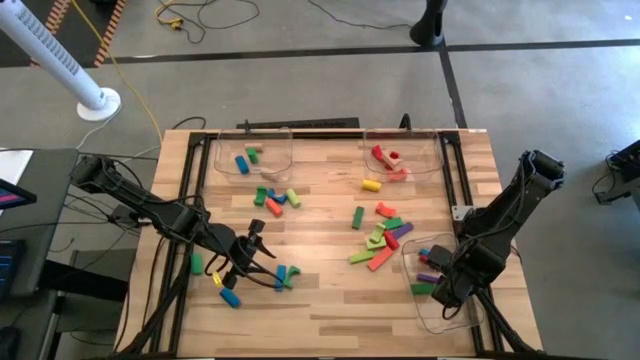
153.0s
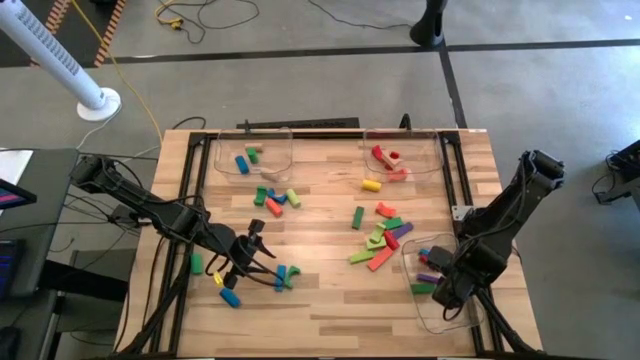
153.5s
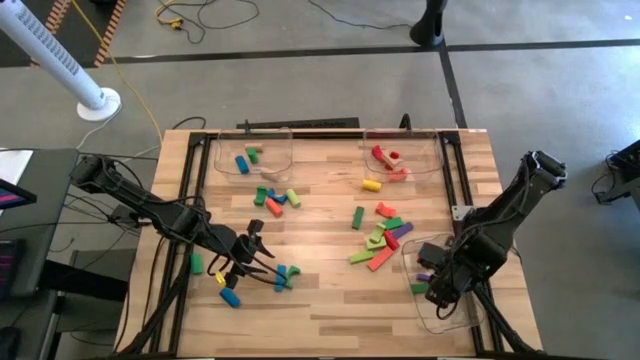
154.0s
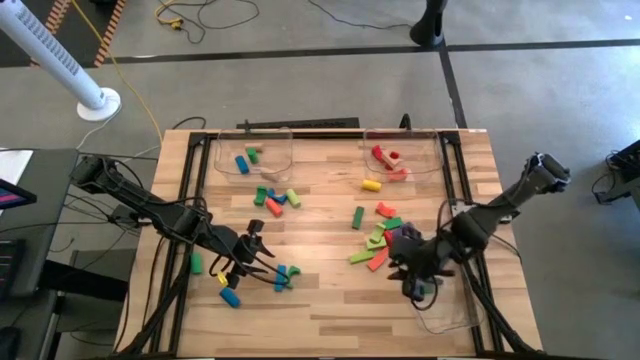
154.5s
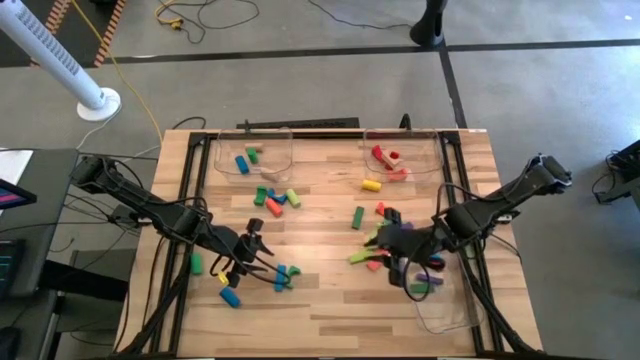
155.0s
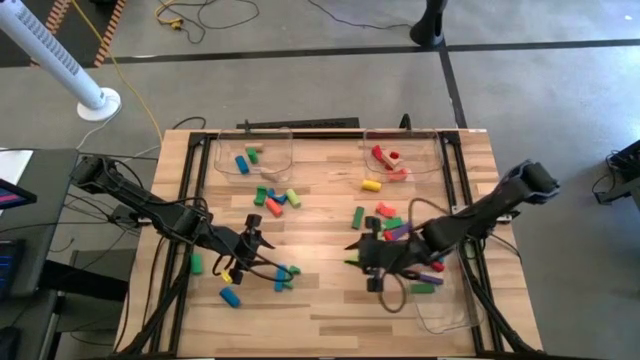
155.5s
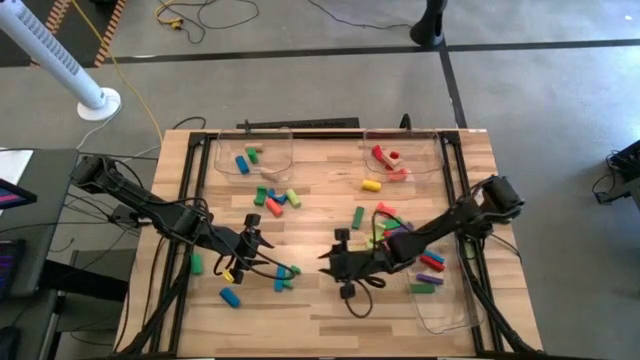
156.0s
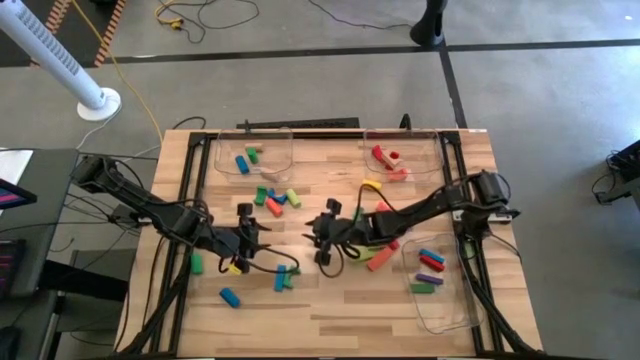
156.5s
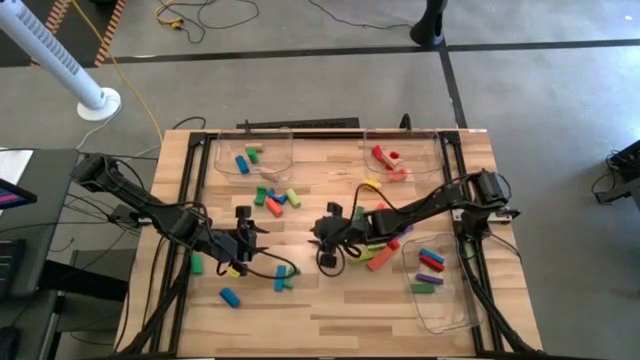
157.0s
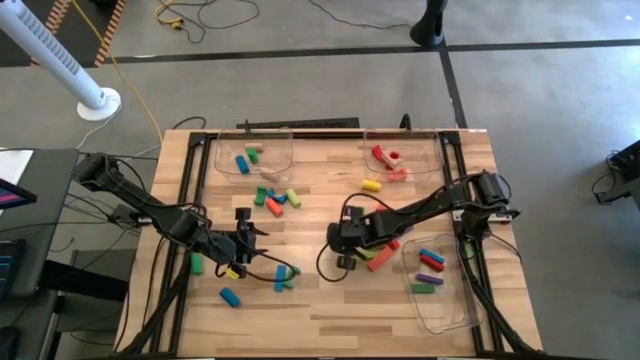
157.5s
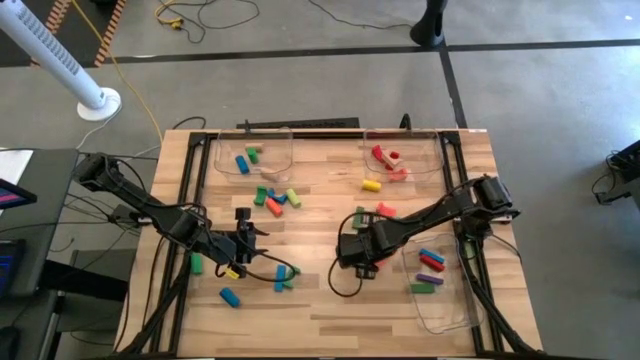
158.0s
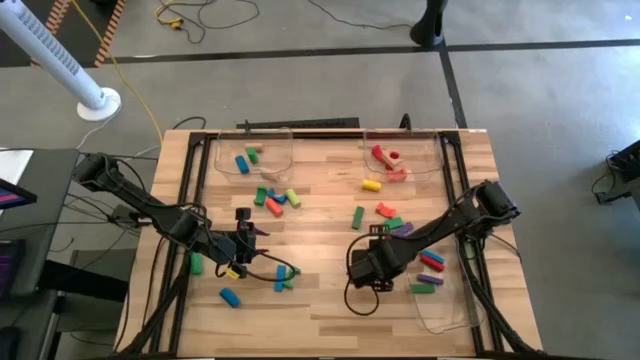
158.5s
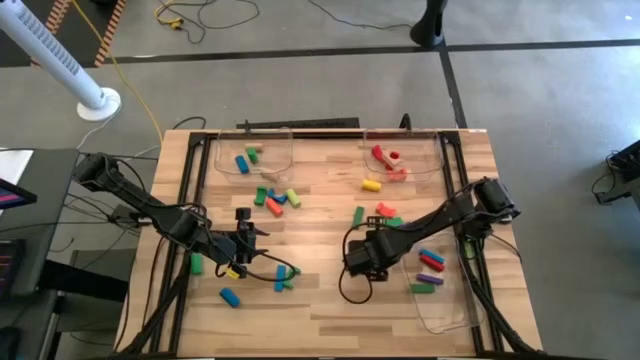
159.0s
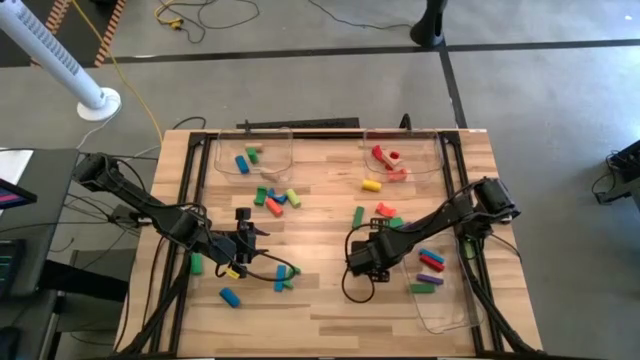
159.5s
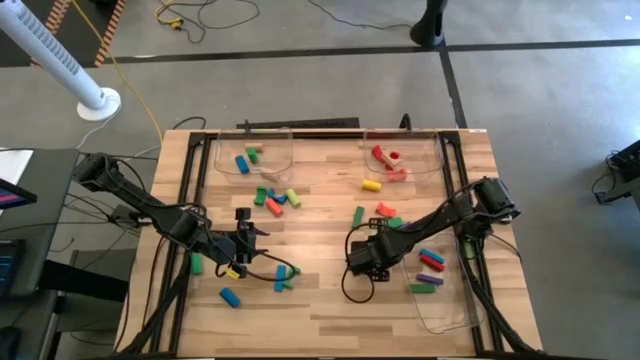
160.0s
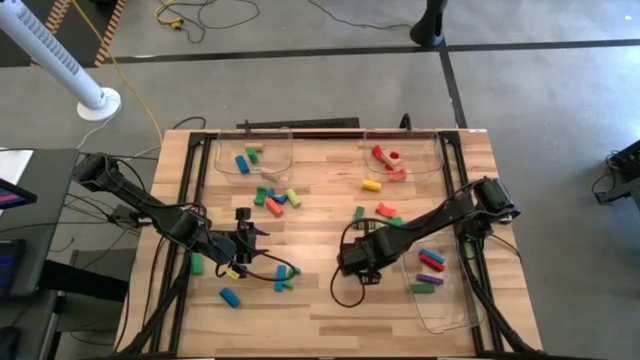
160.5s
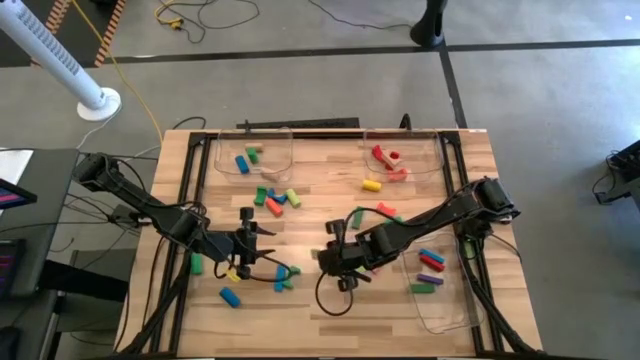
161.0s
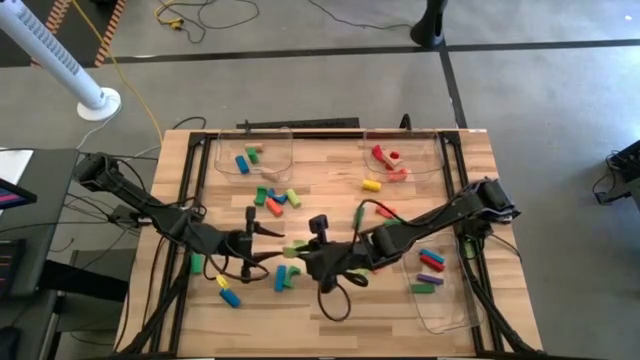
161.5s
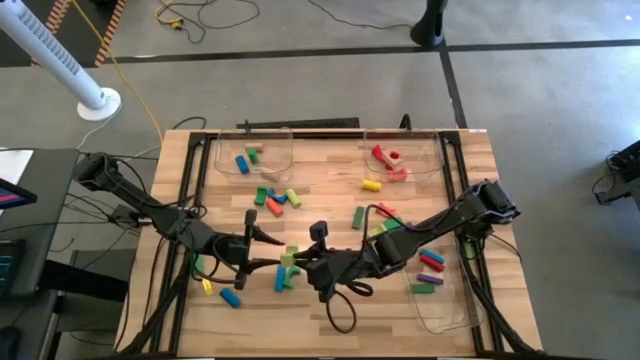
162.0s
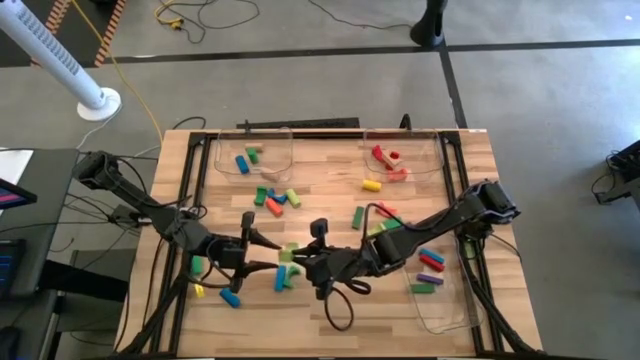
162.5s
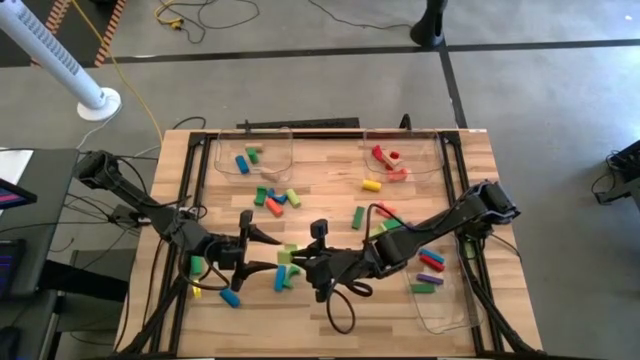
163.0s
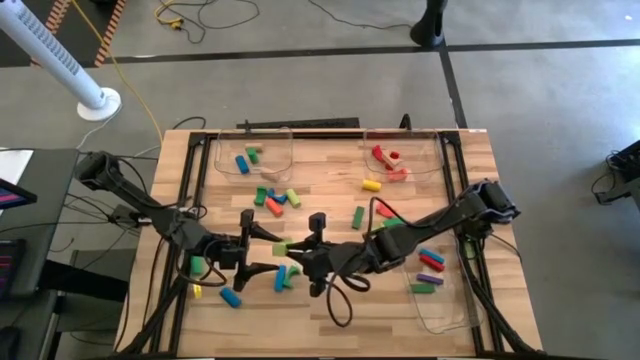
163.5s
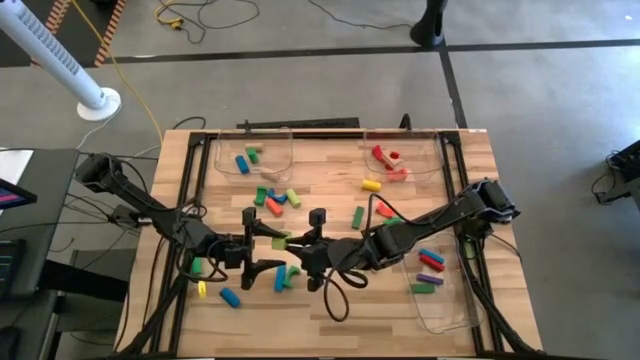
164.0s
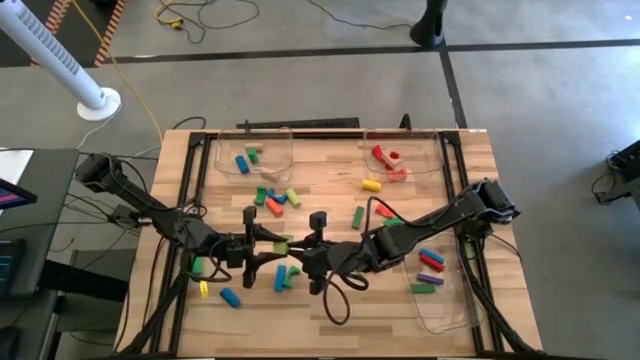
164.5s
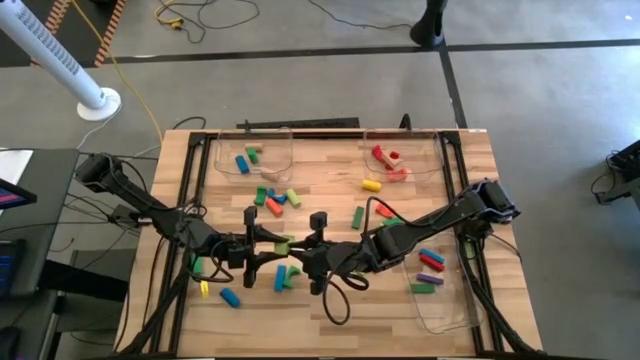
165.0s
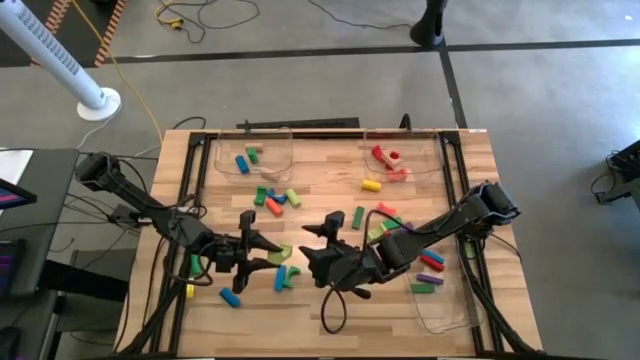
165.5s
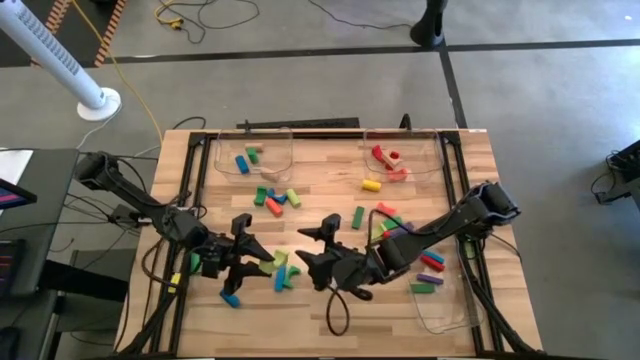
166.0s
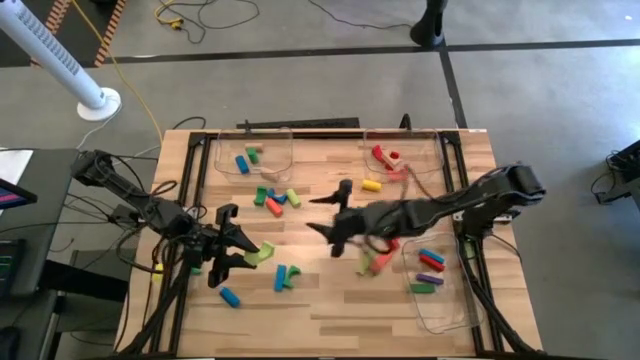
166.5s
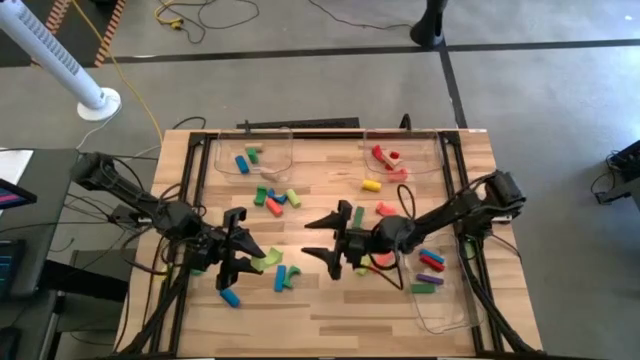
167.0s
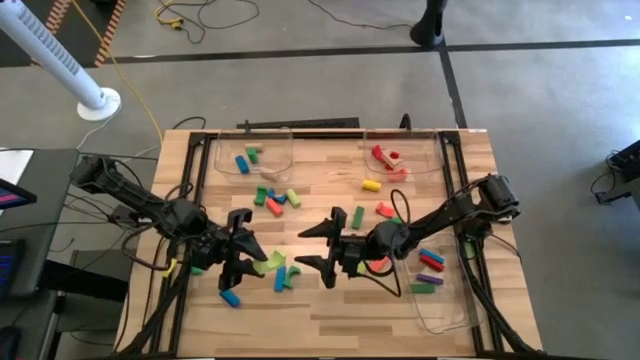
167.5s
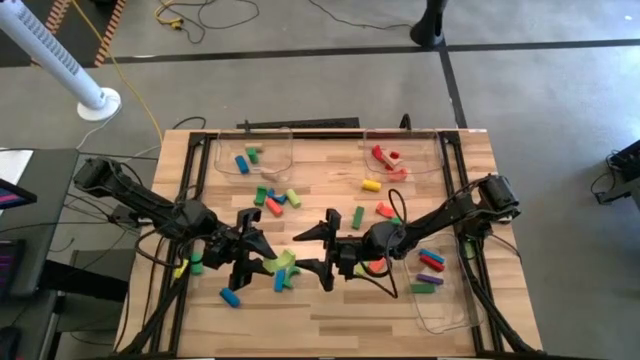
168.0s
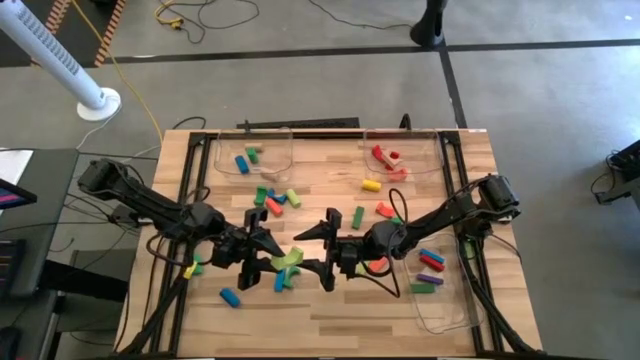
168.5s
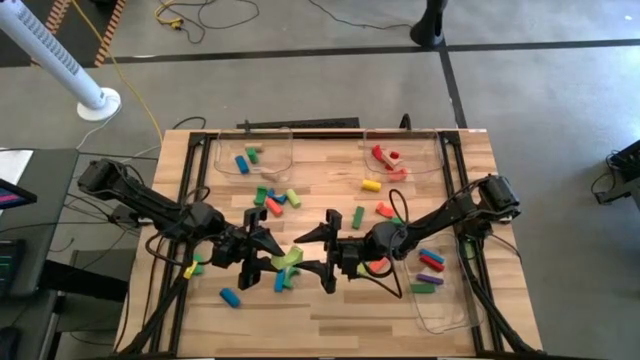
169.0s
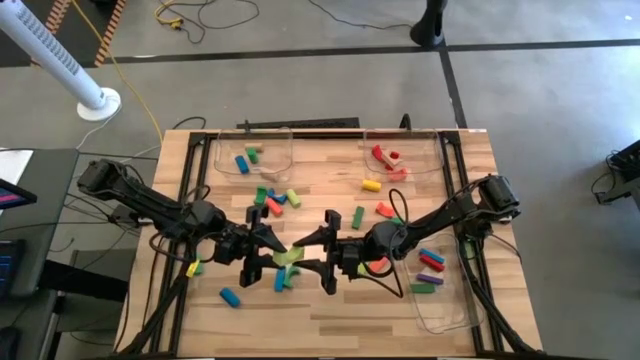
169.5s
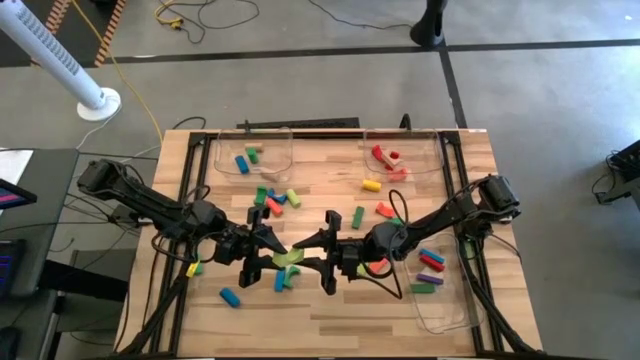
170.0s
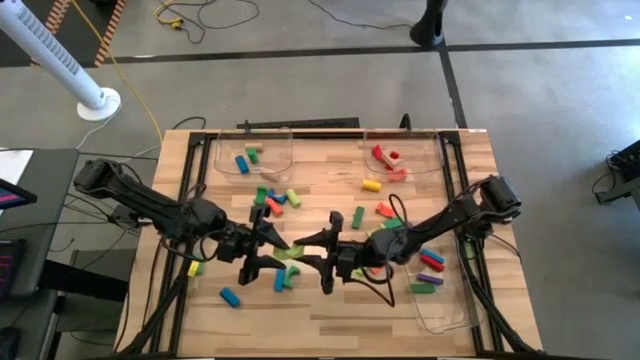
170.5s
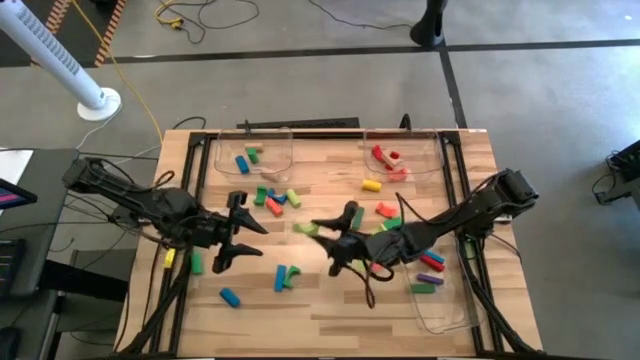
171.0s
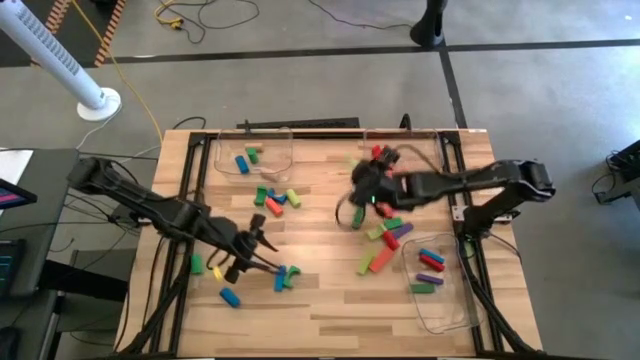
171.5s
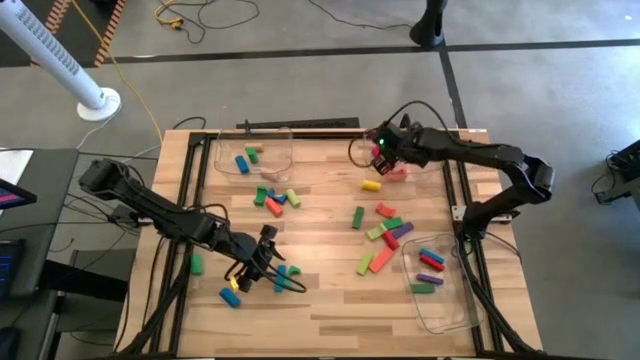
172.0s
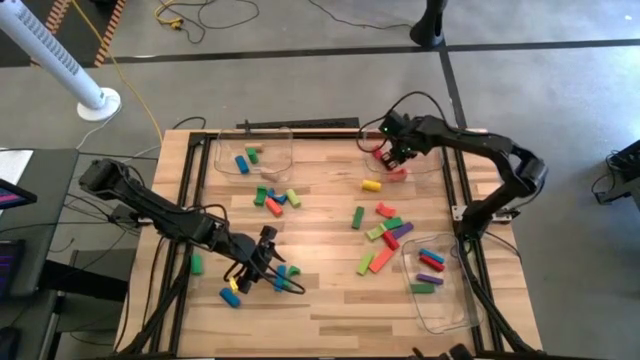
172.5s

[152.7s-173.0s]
Task: Sort blocks by size
Put the light green arch block into the top right transparent bin

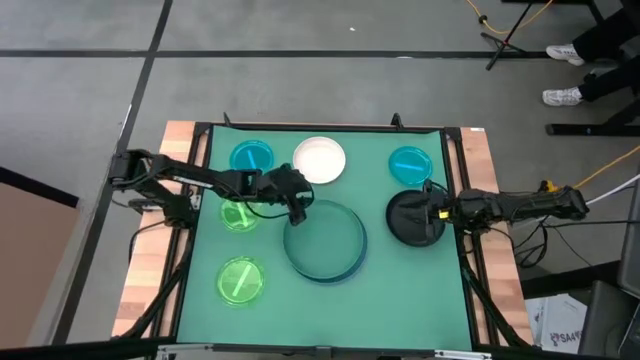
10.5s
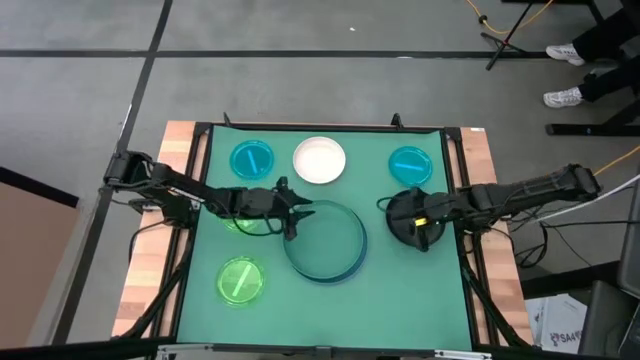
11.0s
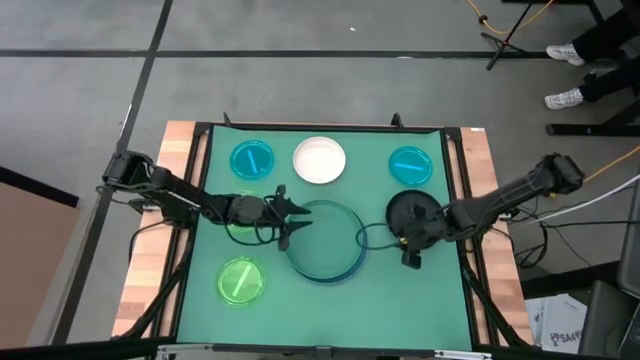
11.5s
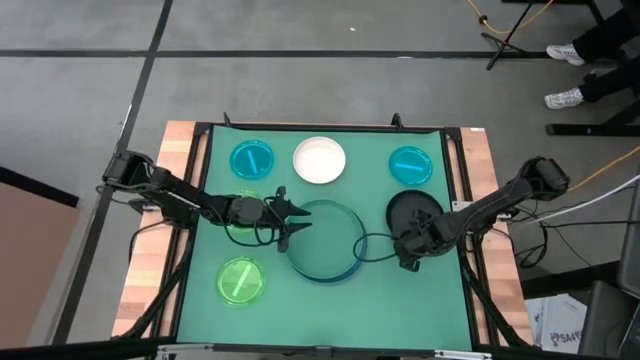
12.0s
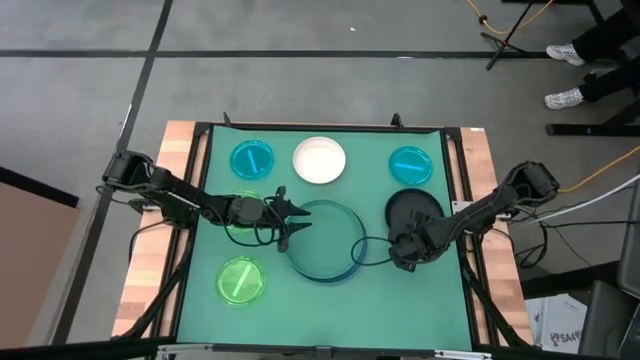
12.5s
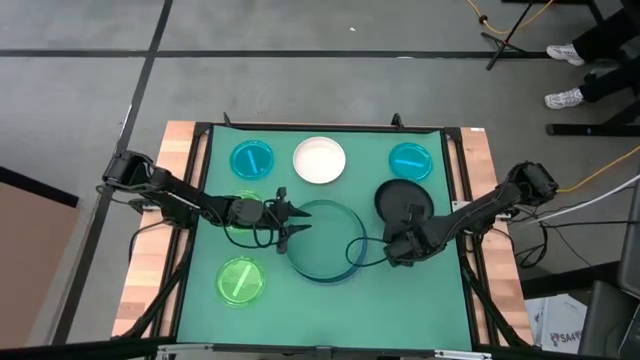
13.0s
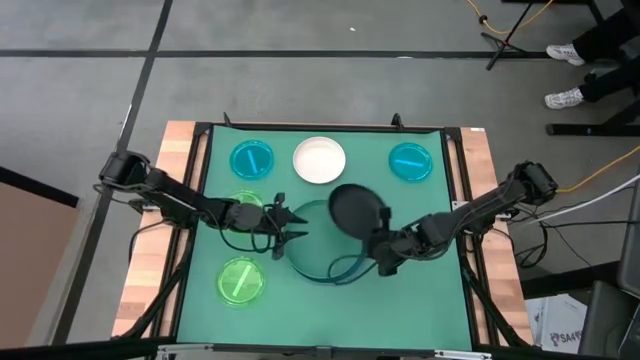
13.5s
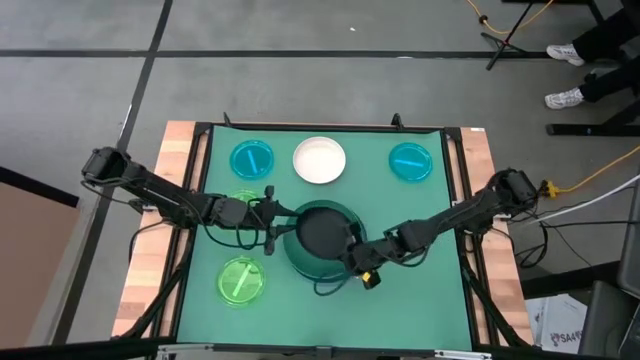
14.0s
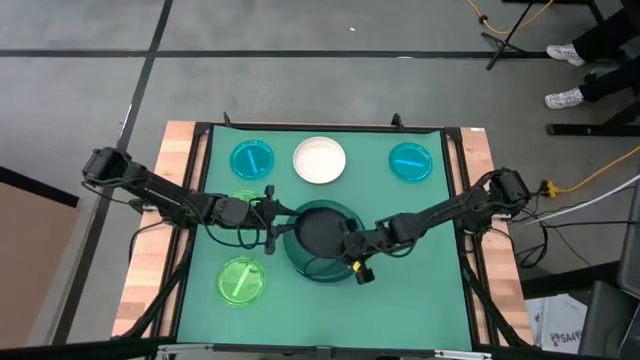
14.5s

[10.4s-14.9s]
Task: Stack plastic plates
Stack the black plate on top of the green plate
